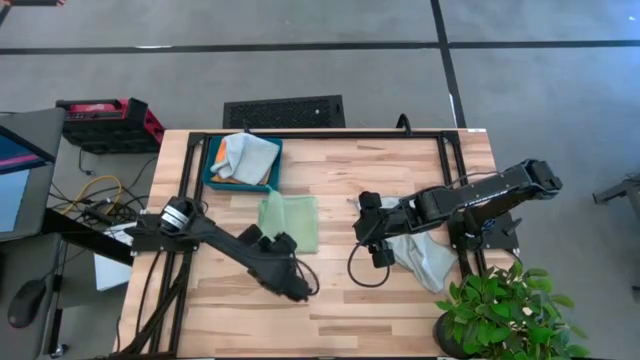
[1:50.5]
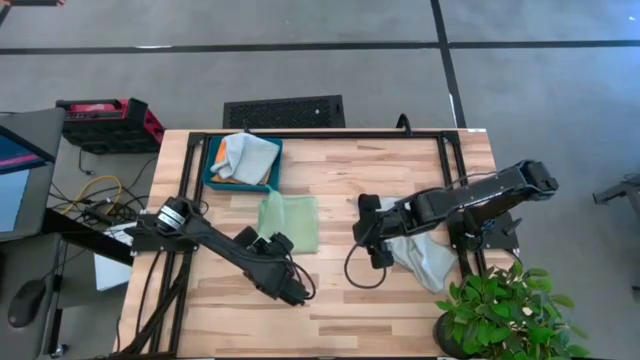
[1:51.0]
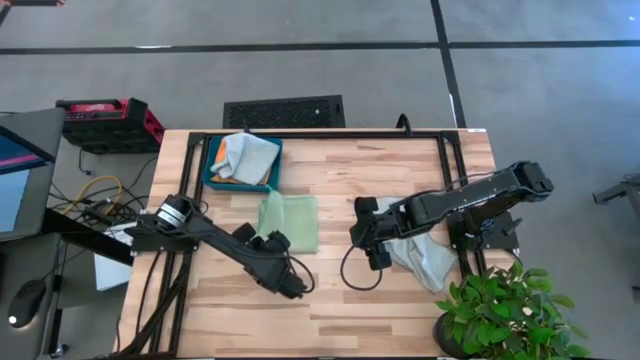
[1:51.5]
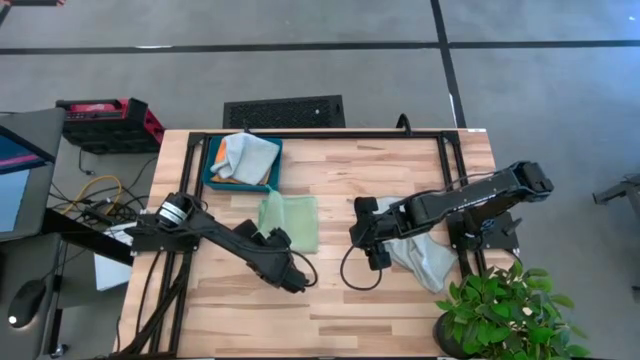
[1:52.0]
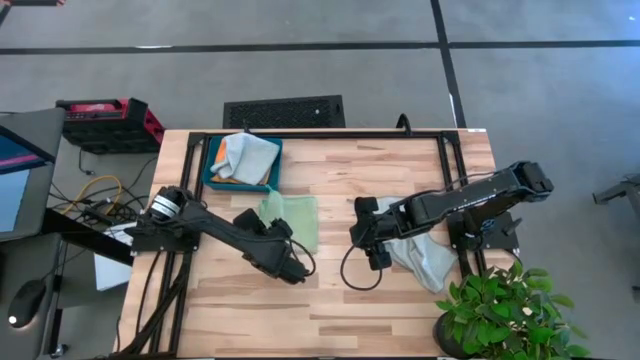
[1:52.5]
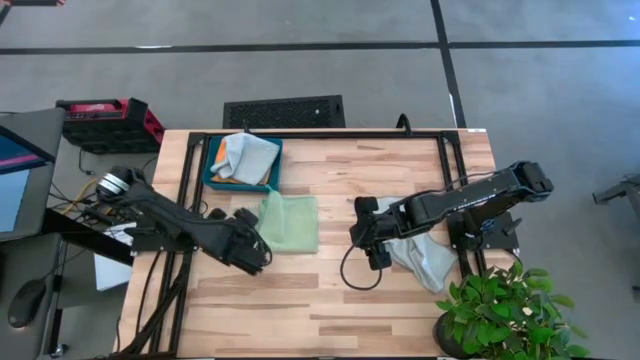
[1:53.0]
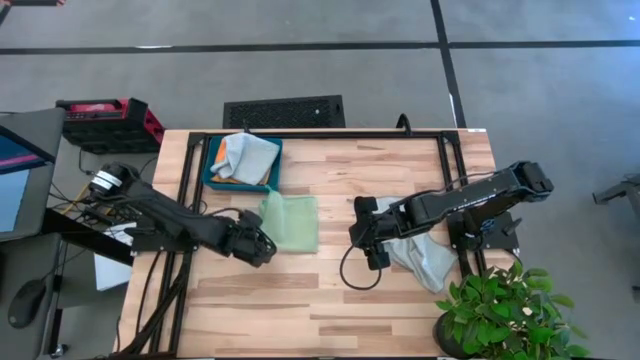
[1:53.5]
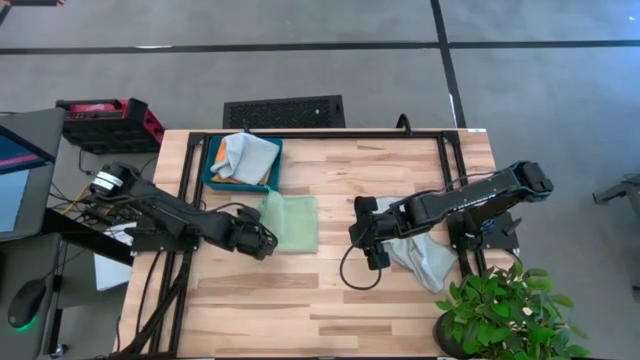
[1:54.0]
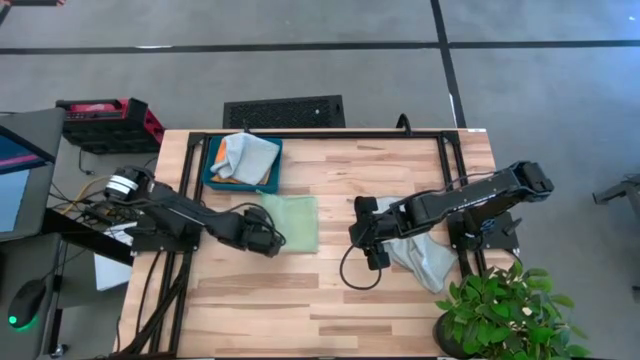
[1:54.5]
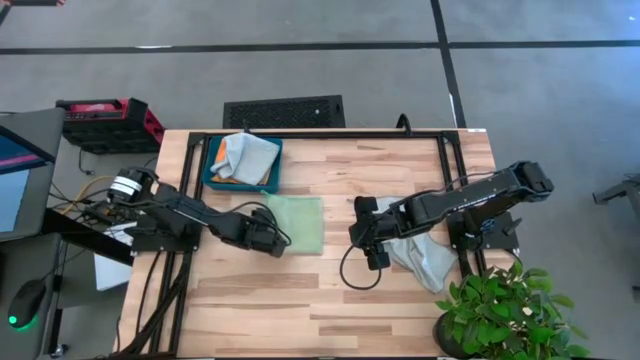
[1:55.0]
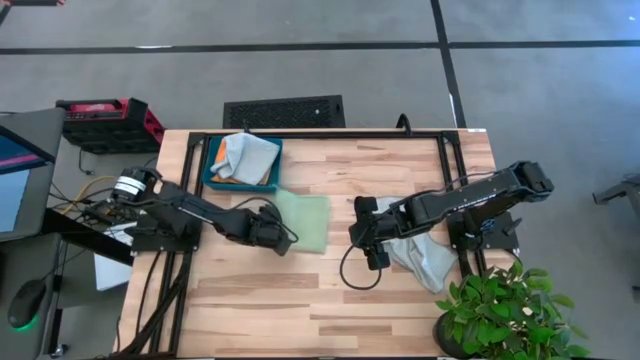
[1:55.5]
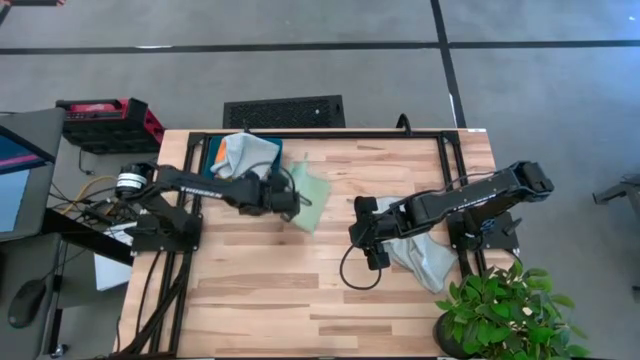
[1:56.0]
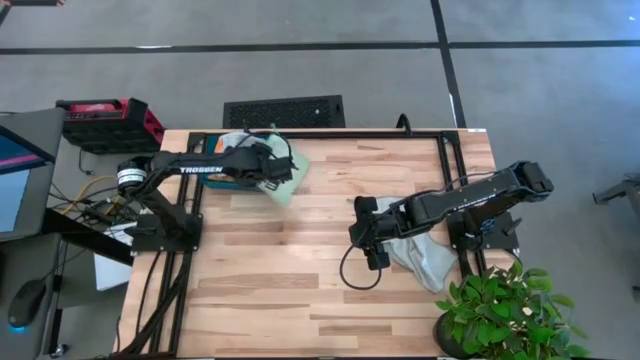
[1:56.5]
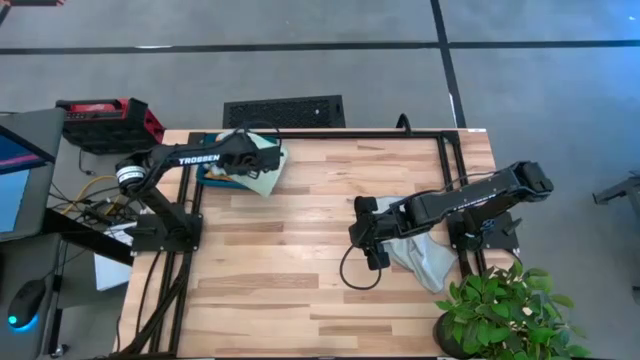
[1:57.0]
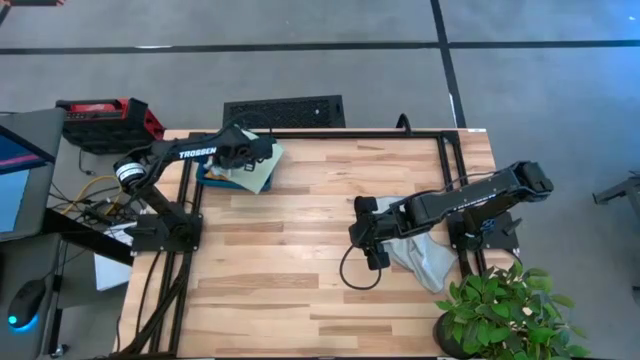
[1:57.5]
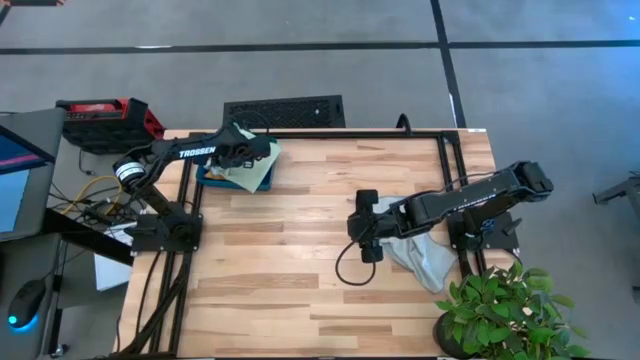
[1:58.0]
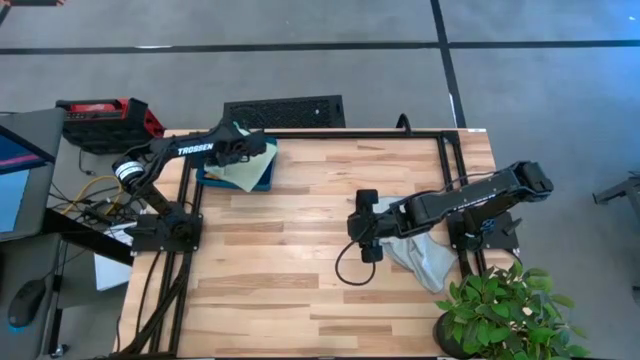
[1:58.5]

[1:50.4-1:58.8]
Task: Fold microfiber towels
Put the folded green towel into the blue bin

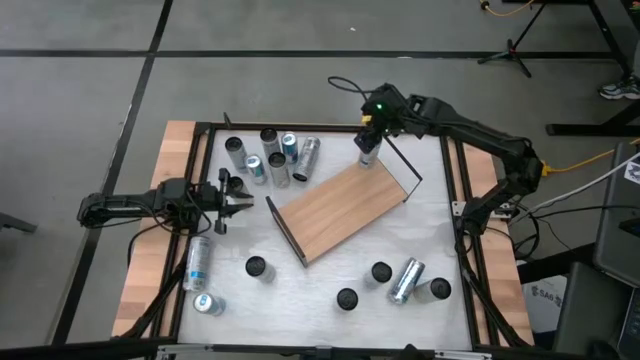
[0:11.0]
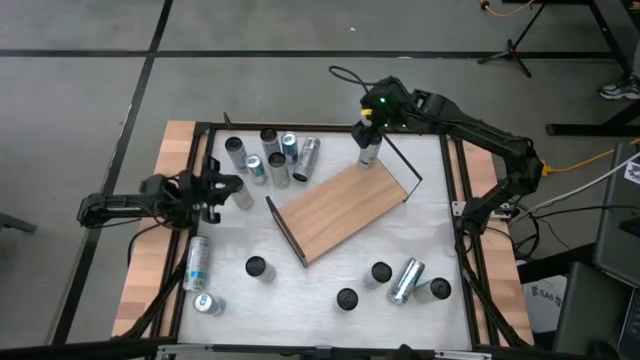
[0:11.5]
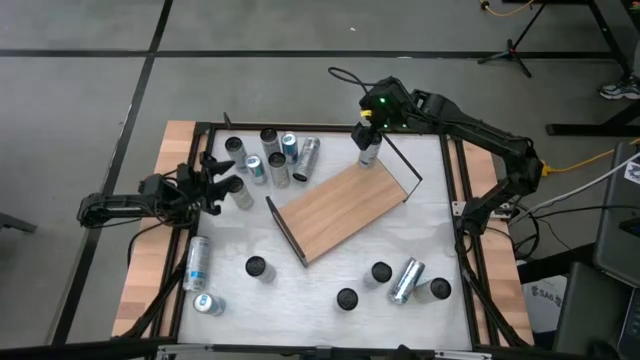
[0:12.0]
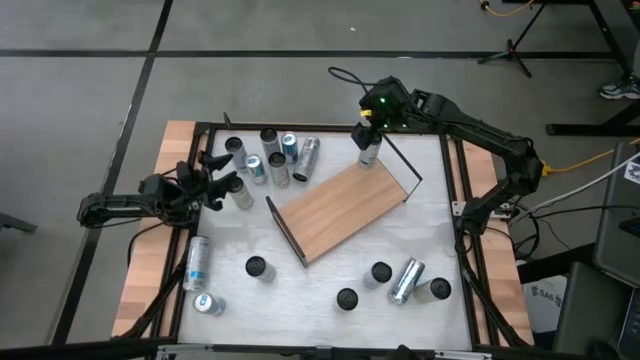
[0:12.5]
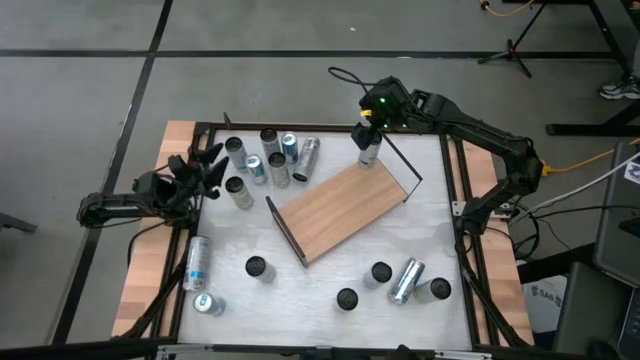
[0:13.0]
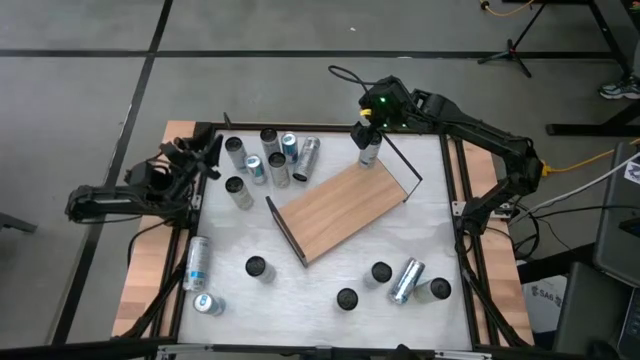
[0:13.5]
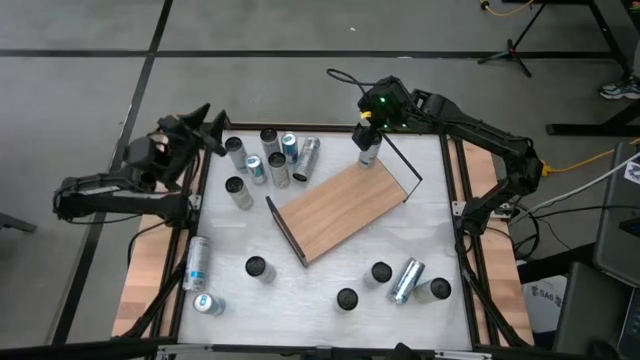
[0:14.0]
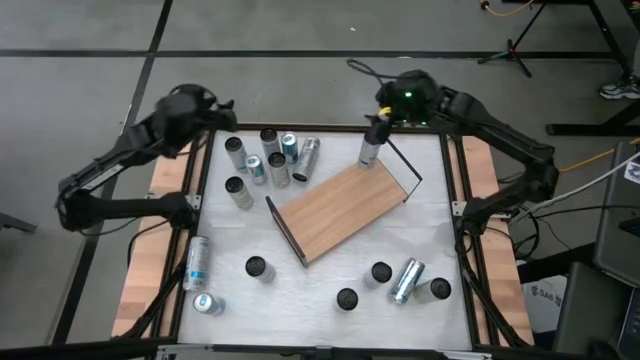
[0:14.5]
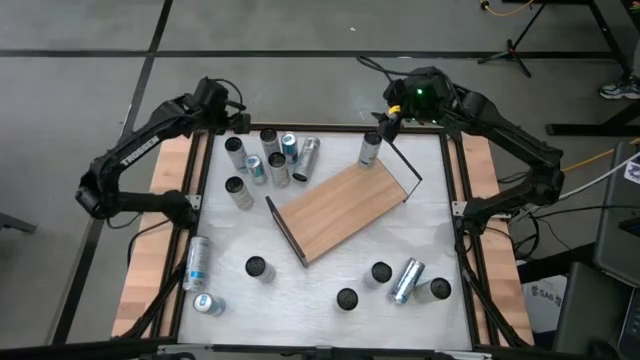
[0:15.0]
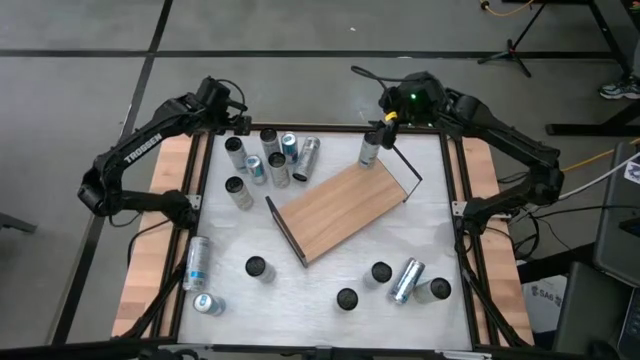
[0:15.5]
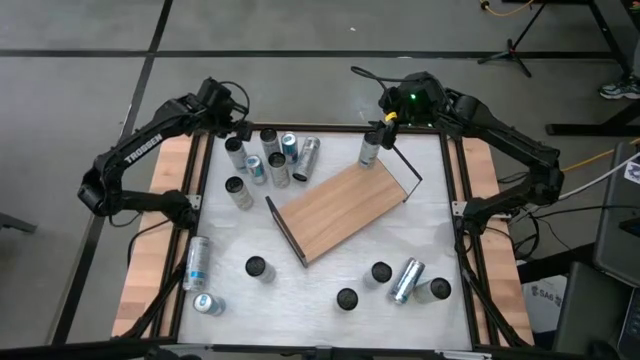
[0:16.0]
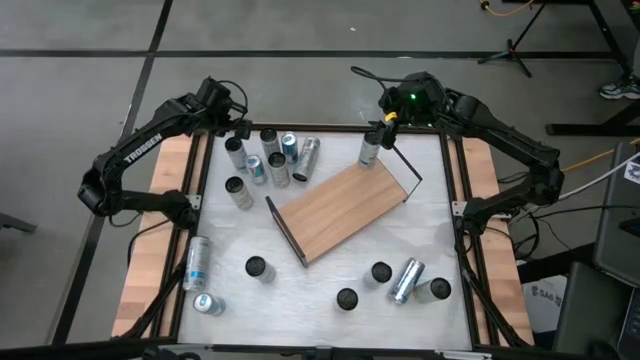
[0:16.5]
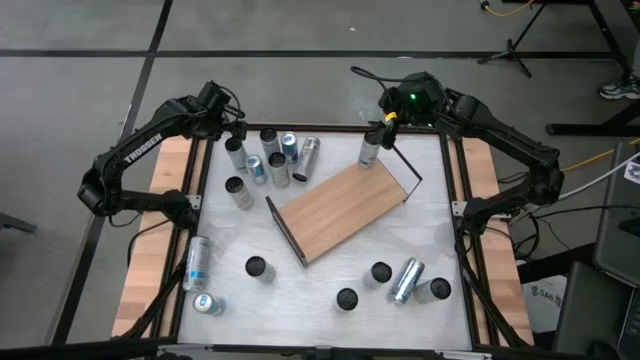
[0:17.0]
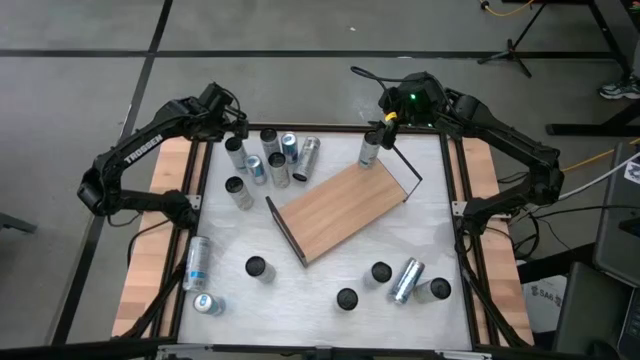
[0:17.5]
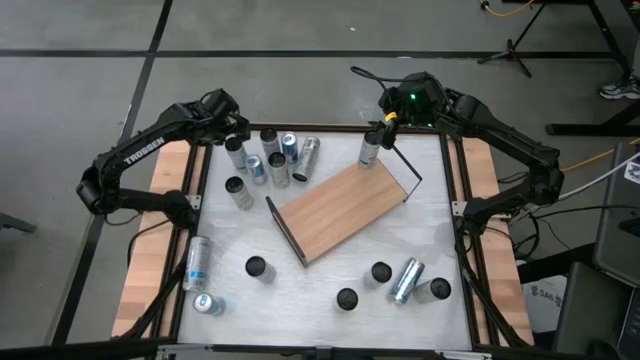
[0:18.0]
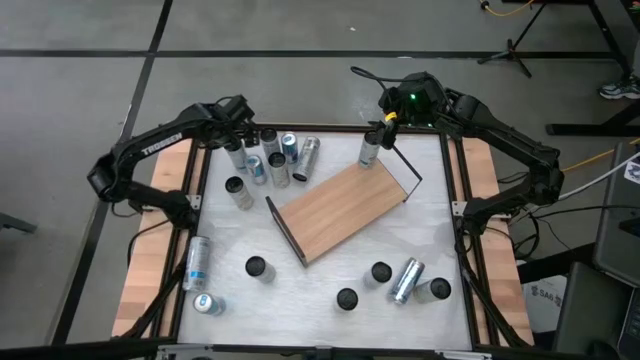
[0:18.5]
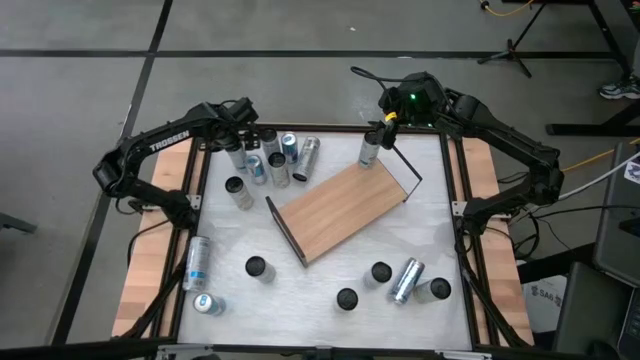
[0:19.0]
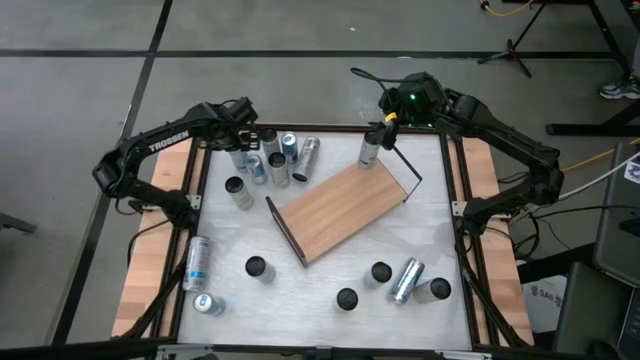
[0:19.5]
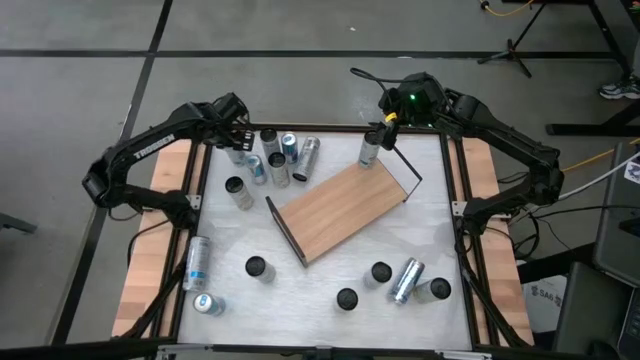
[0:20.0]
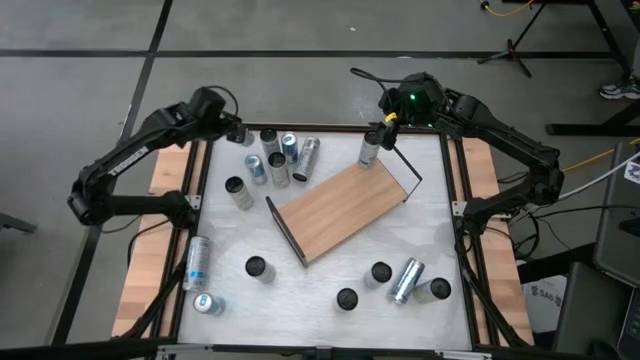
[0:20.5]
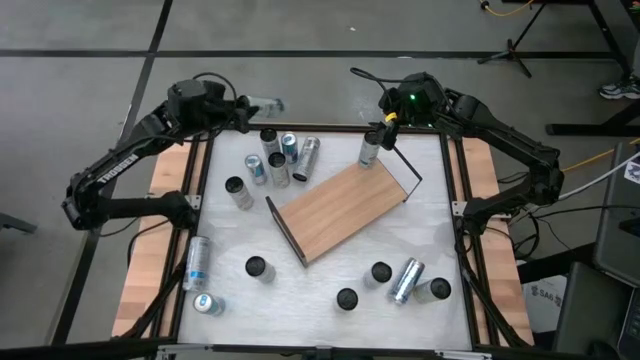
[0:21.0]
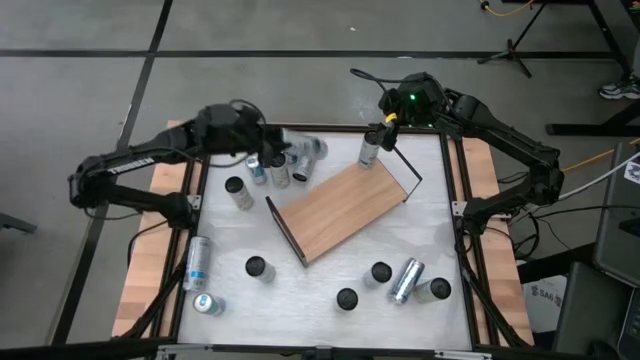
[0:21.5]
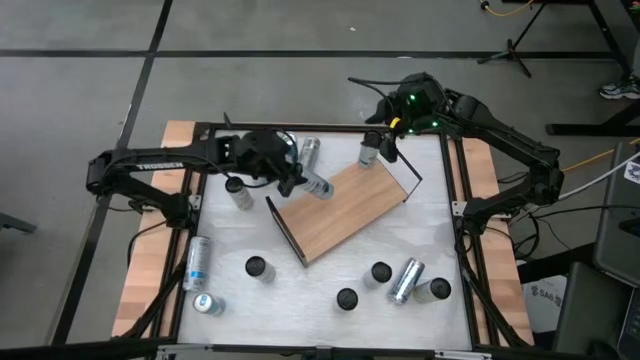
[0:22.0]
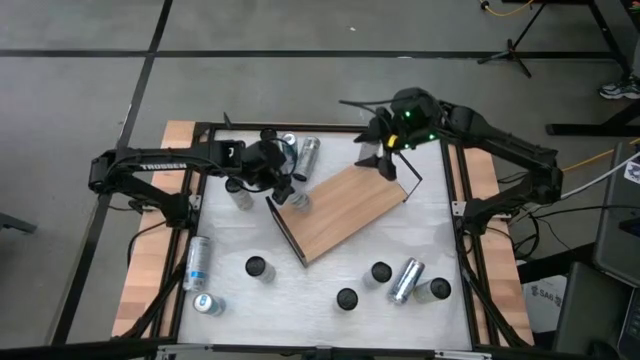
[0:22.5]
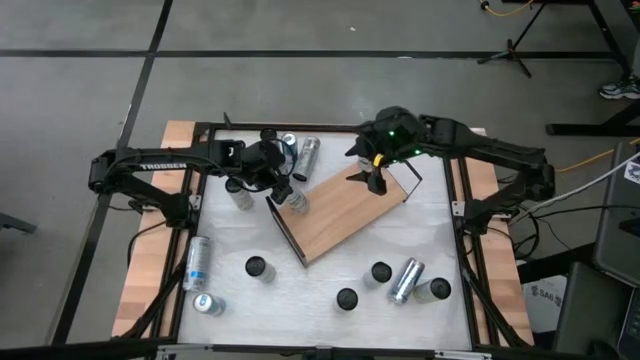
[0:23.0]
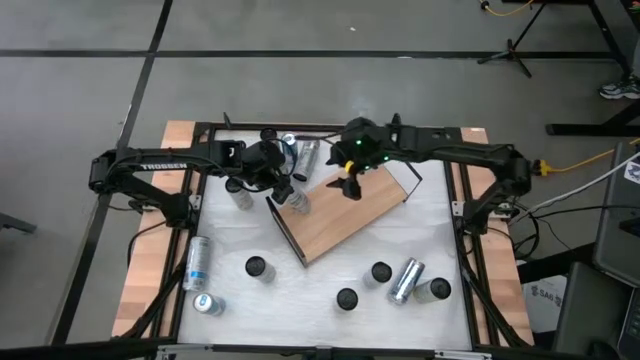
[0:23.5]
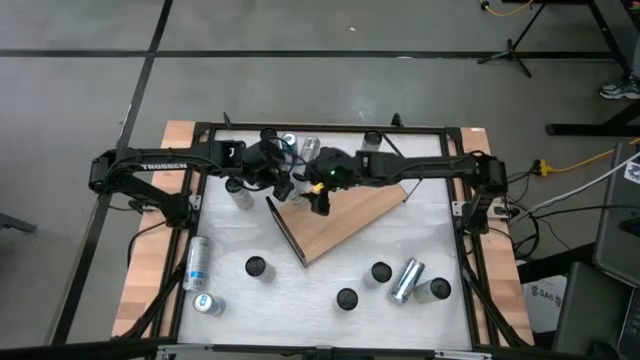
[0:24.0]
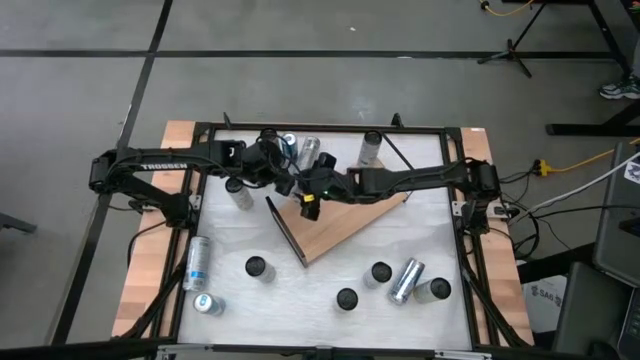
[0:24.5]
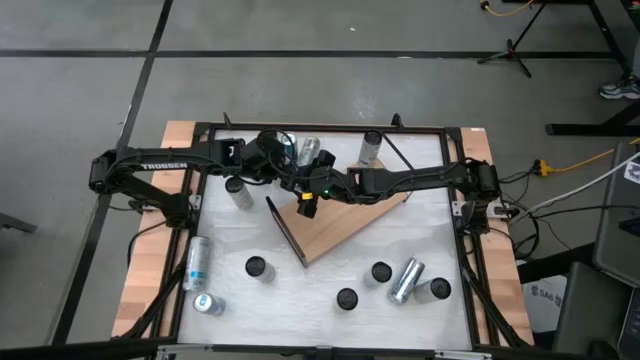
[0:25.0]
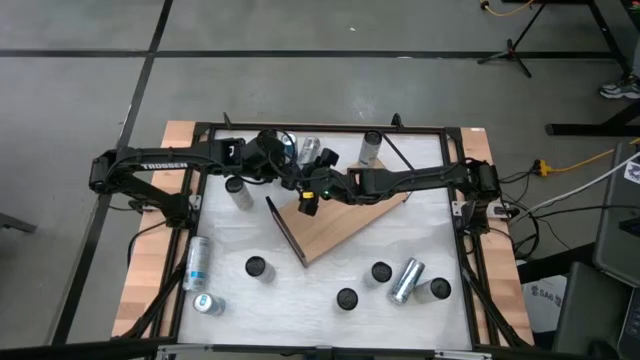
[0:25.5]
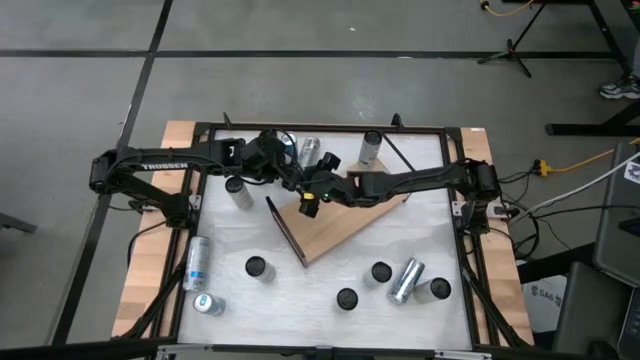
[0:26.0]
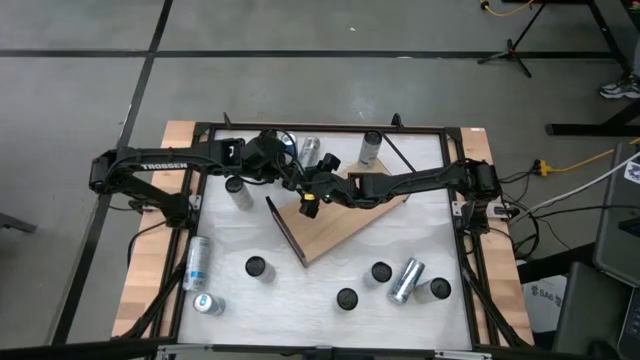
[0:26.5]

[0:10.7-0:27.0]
Task: Place canned beverage on shelf
Put the white blue soda can on the shelf
